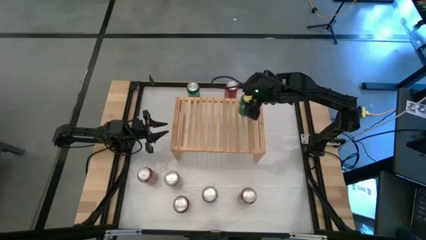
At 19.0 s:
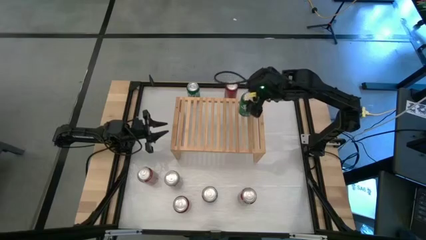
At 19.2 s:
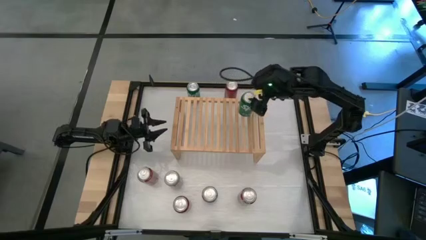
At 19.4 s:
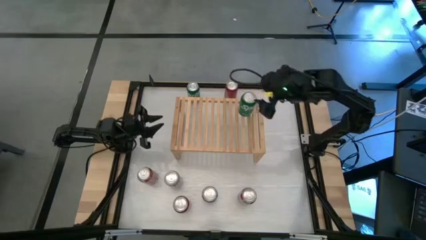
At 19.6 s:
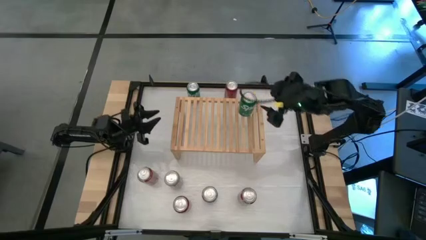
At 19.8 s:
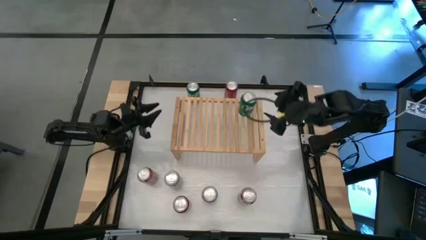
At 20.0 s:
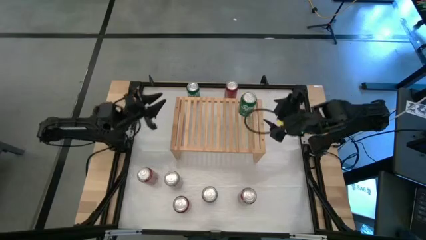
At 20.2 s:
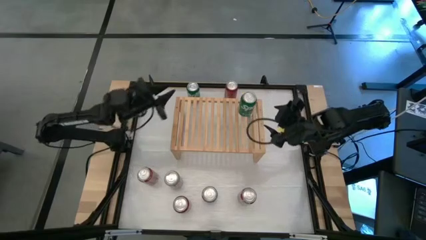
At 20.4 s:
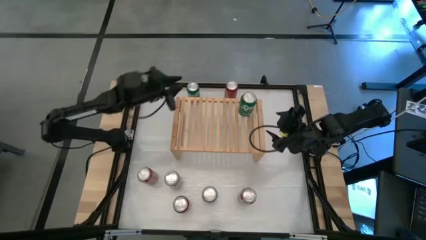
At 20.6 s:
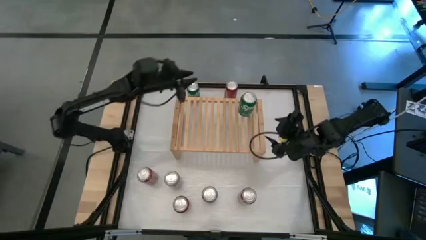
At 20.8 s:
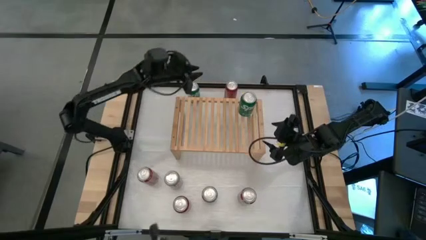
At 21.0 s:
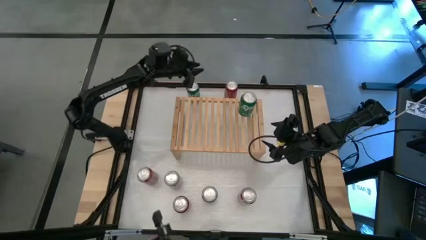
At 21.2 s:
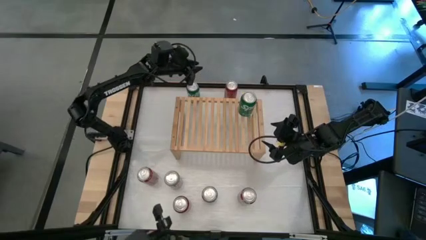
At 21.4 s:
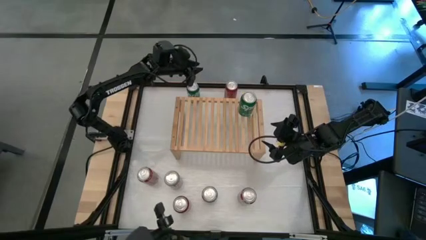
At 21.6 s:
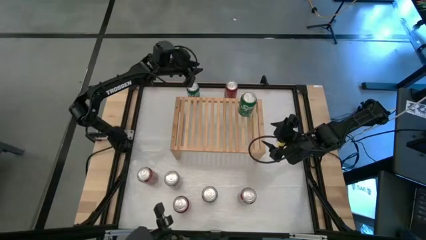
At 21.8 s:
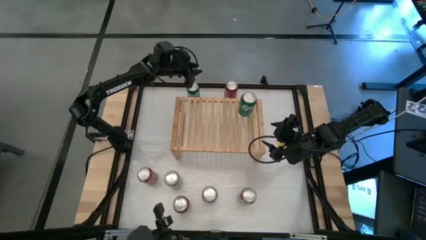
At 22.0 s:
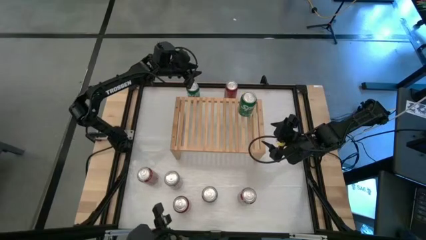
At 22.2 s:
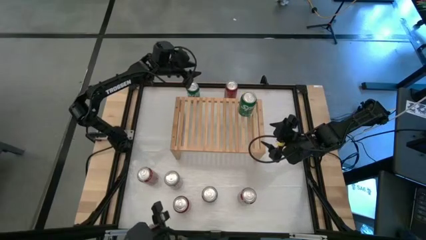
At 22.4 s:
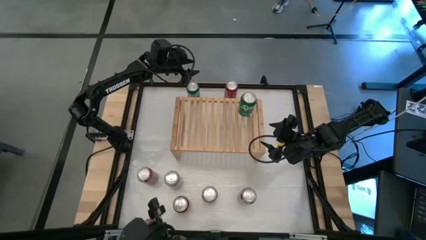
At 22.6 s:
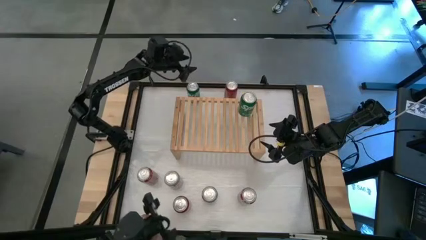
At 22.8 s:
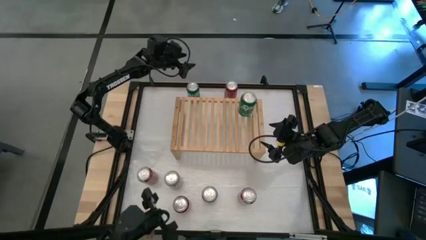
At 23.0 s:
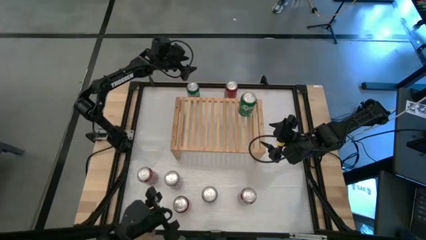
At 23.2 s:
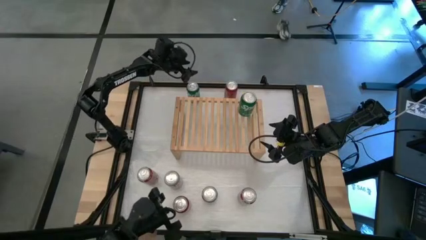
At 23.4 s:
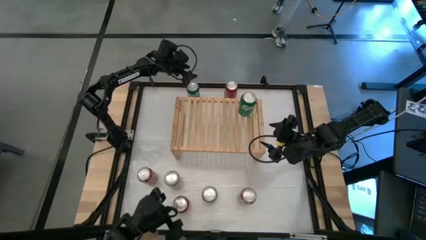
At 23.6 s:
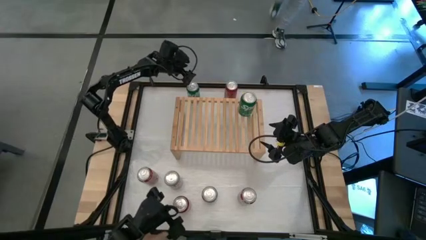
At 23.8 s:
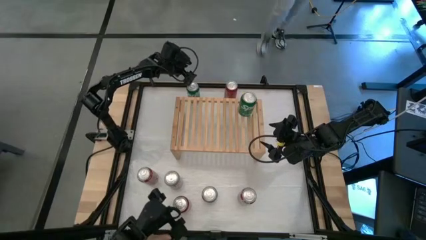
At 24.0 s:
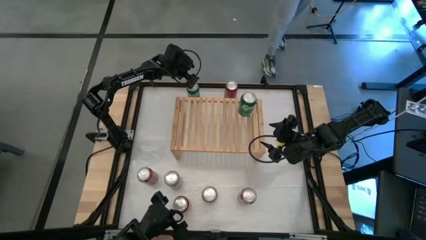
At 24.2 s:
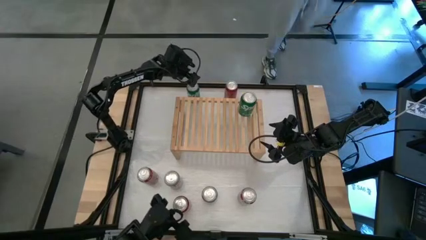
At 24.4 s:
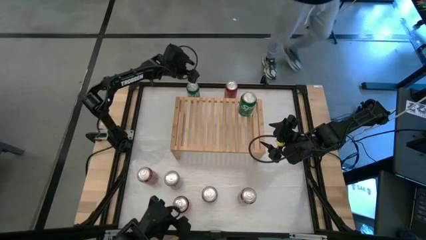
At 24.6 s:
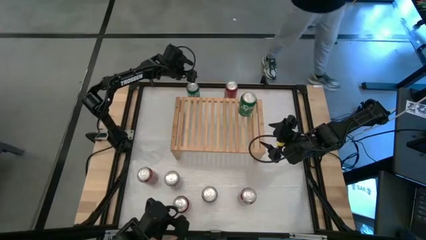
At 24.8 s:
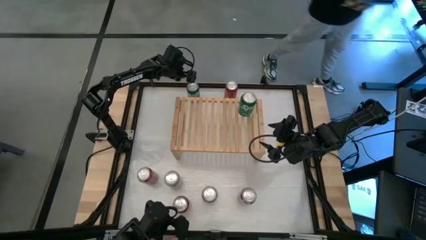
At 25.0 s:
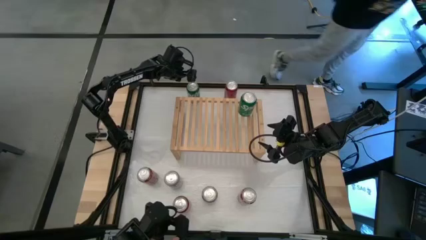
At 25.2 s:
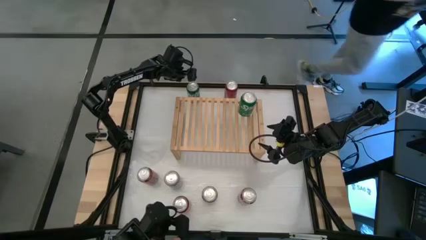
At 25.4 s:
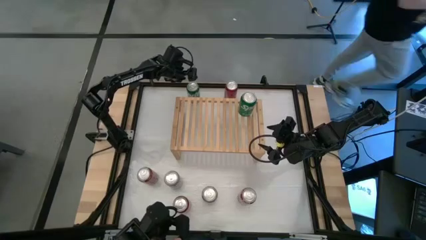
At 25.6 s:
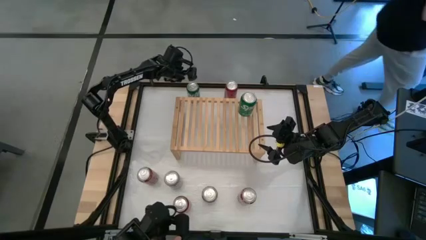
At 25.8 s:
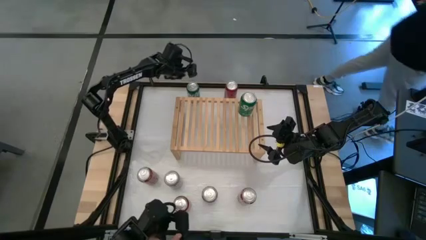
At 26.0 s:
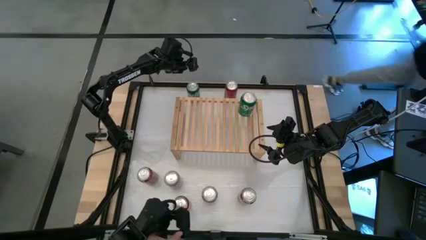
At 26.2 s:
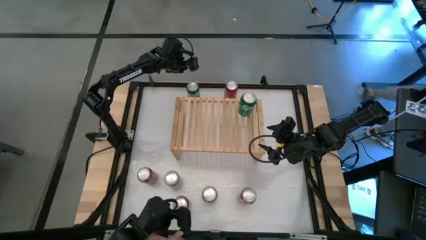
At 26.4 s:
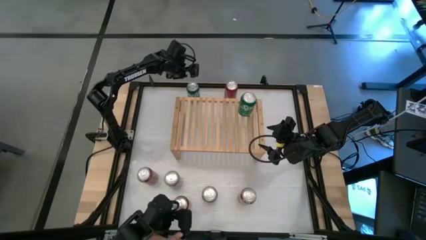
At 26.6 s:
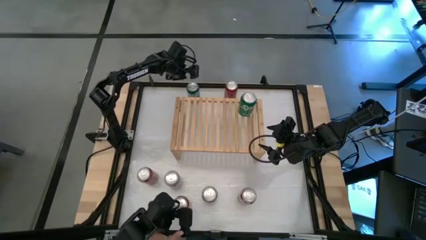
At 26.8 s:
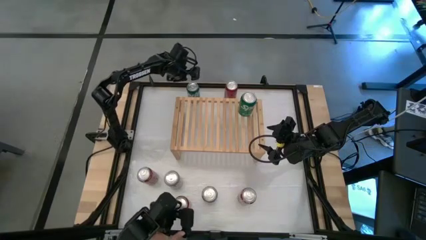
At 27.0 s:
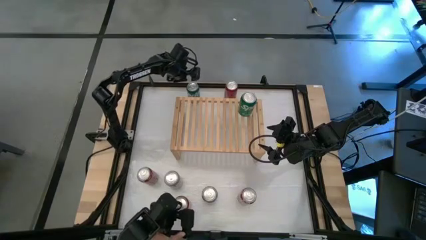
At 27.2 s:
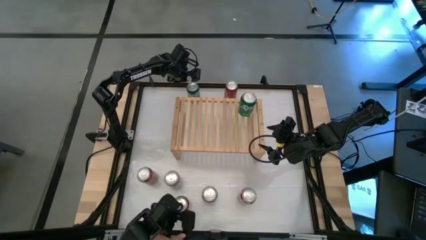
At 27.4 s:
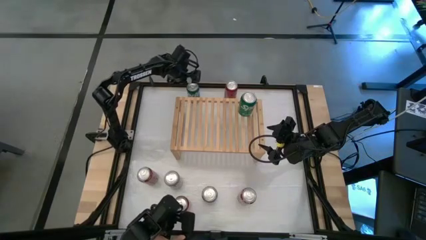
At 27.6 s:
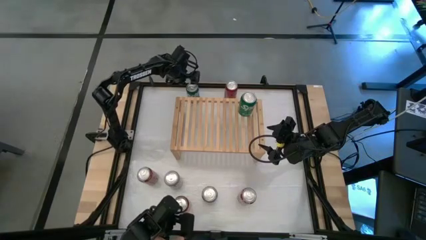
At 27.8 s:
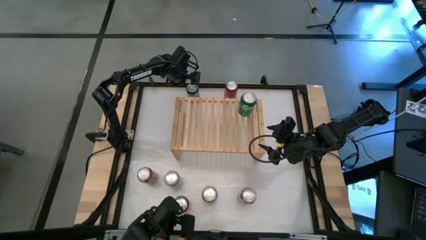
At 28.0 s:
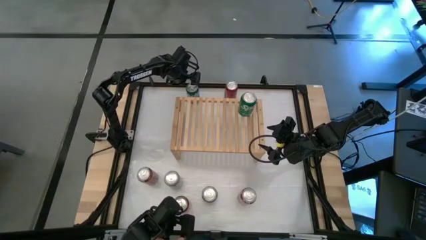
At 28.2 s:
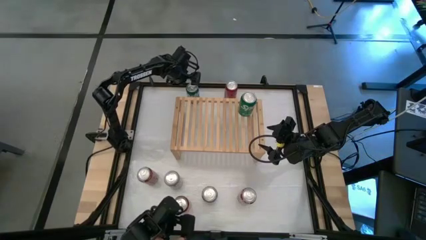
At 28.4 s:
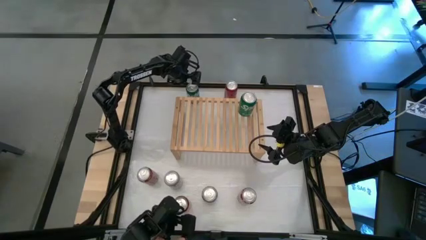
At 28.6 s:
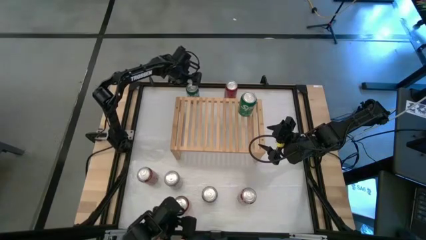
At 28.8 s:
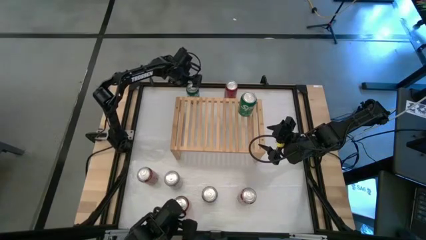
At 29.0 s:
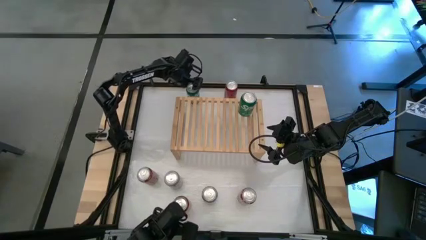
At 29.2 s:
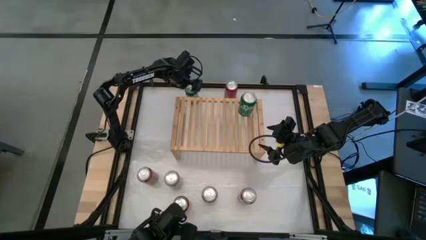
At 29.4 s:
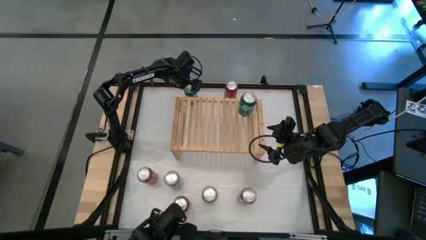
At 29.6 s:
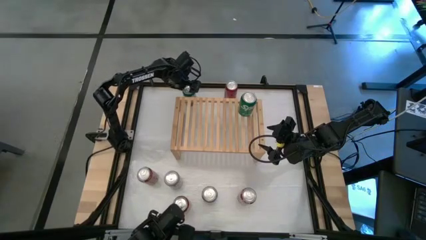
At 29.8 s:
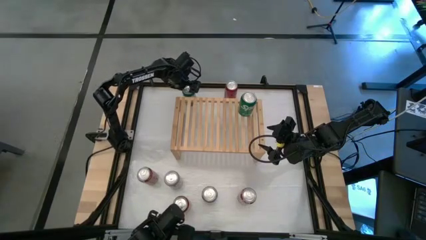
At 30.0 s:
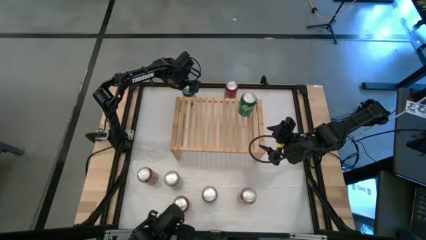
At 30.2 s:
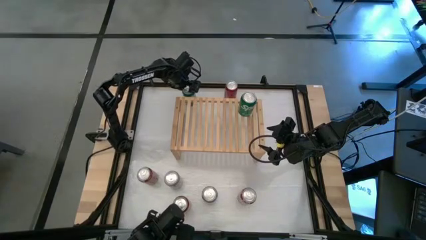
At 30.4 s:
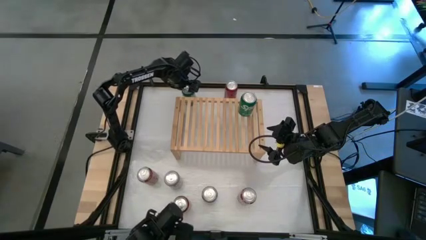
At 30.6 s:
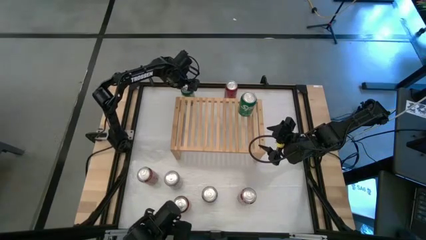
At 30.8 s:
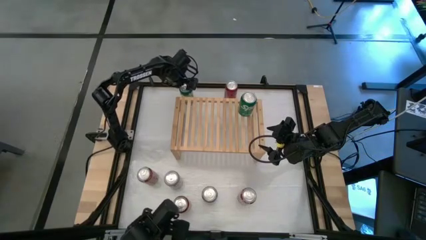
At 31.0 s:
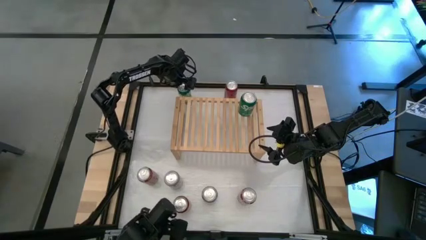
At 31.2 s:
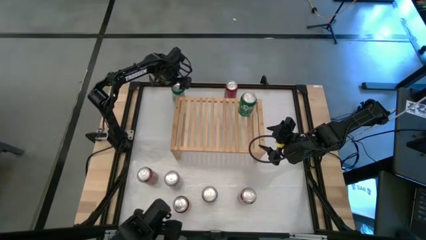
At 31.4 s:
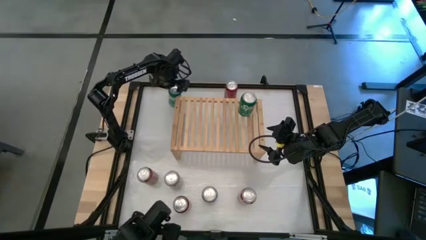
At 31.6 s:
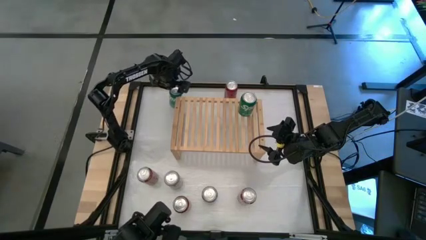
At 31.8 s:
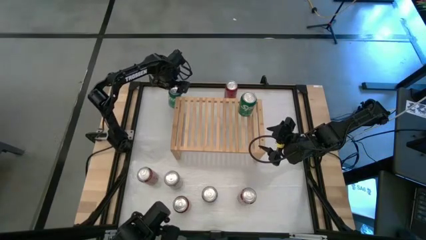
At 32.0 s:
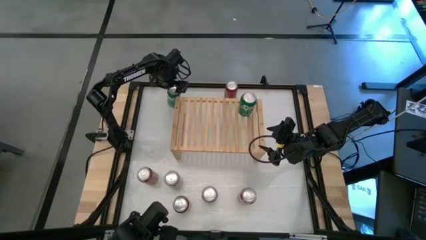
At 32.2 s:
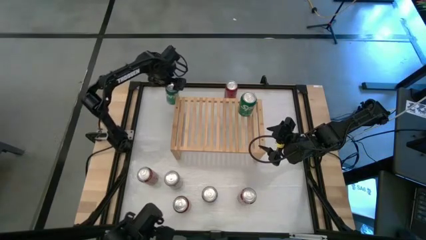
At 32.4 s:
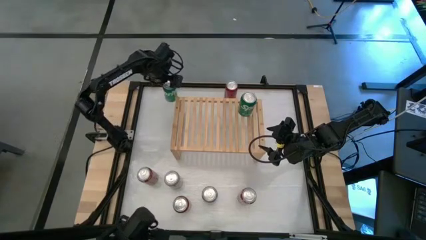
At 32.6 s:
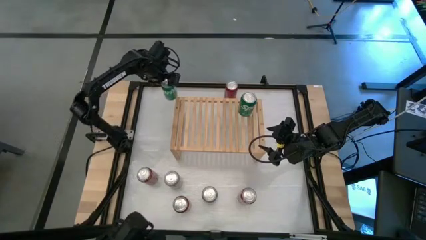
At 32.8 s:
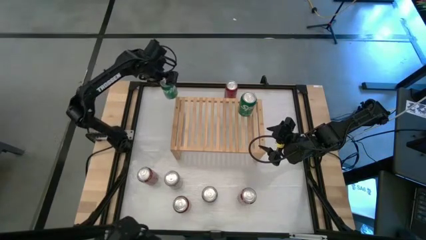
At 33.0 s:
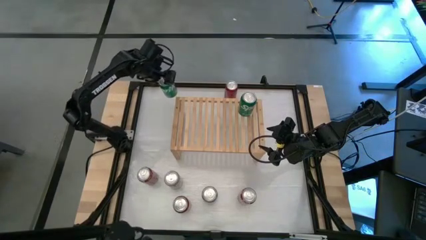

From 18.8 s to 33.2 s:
Task: Place canned beverage on shelf
Put the green soda can on the shelf aligned with the other green soda can
